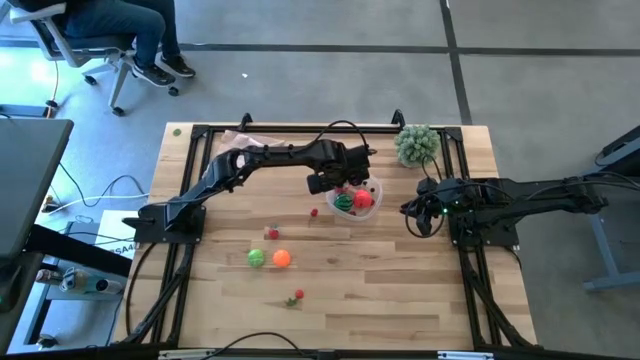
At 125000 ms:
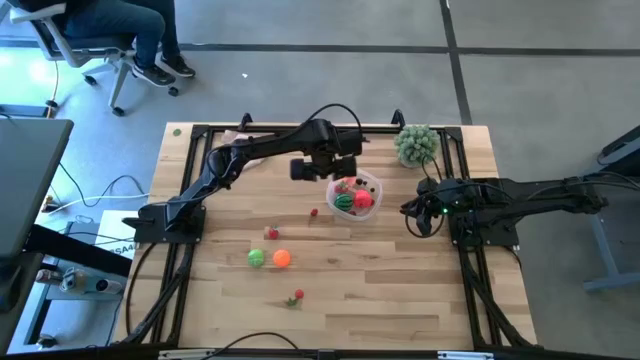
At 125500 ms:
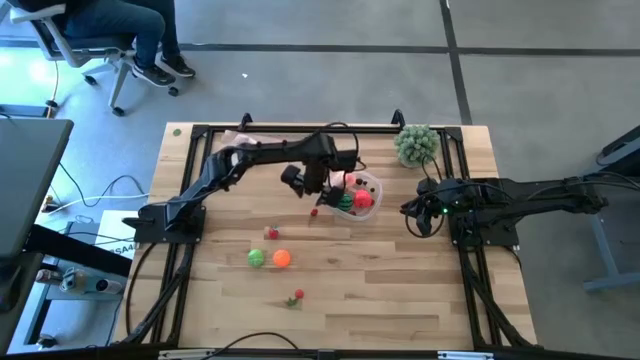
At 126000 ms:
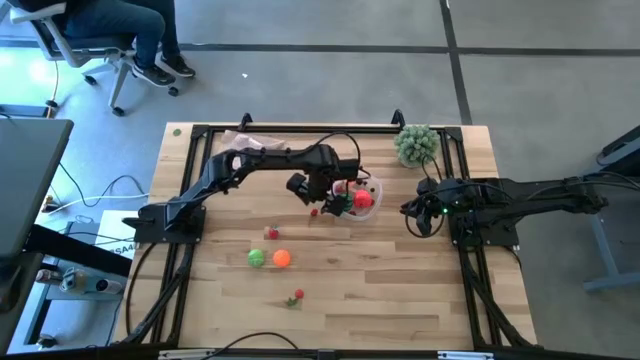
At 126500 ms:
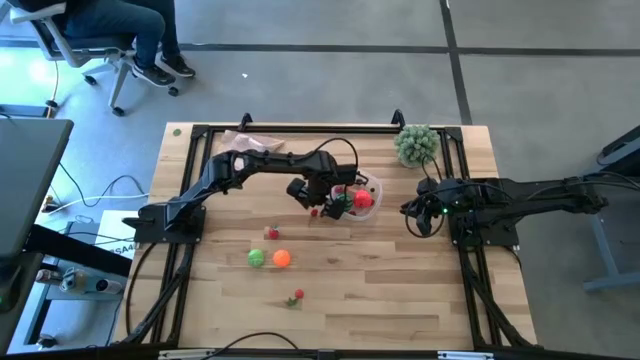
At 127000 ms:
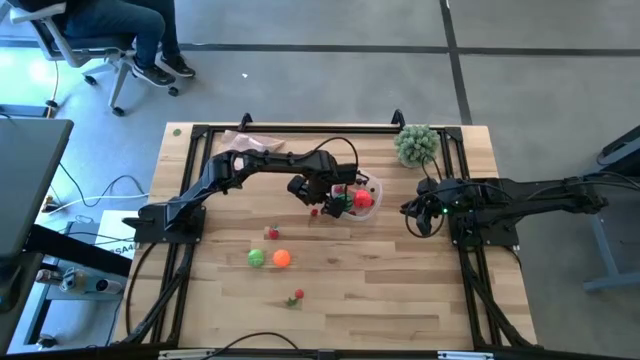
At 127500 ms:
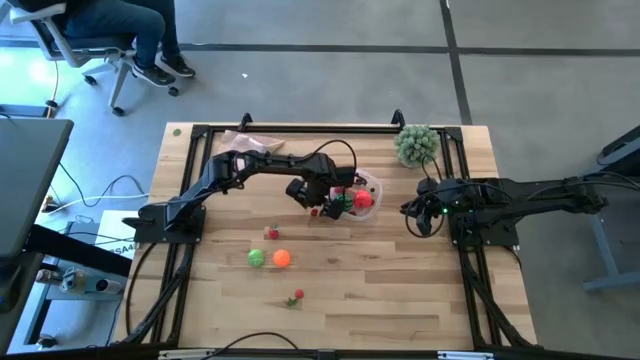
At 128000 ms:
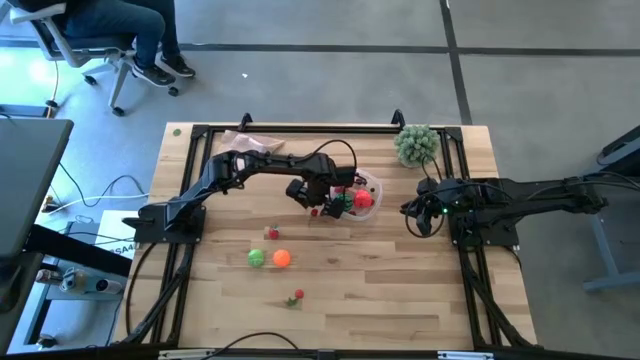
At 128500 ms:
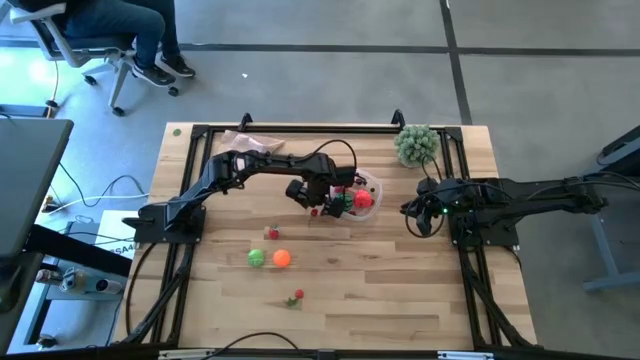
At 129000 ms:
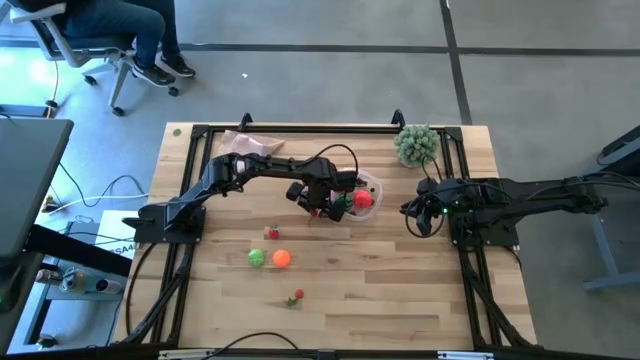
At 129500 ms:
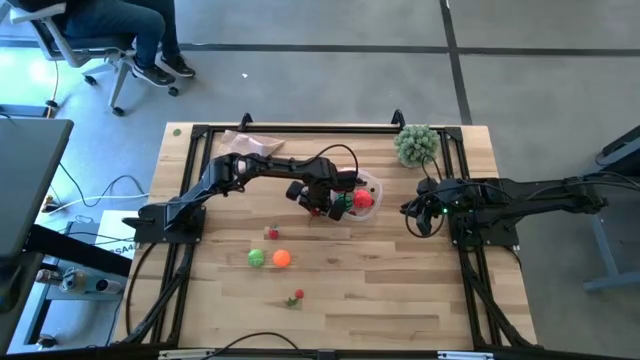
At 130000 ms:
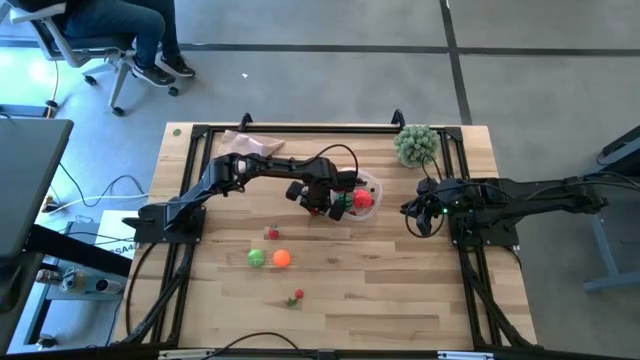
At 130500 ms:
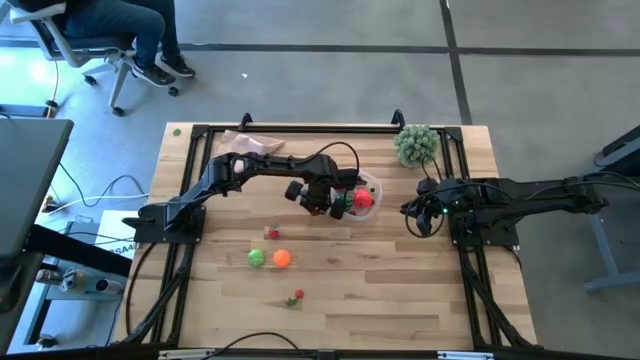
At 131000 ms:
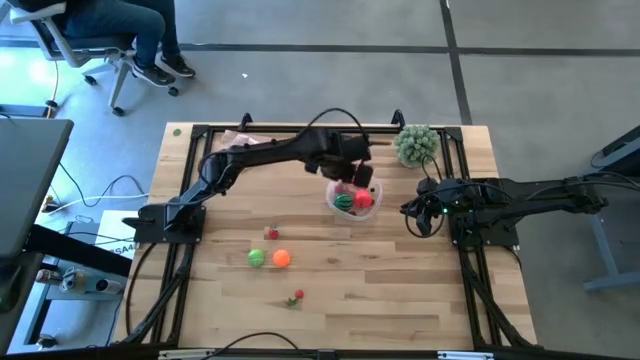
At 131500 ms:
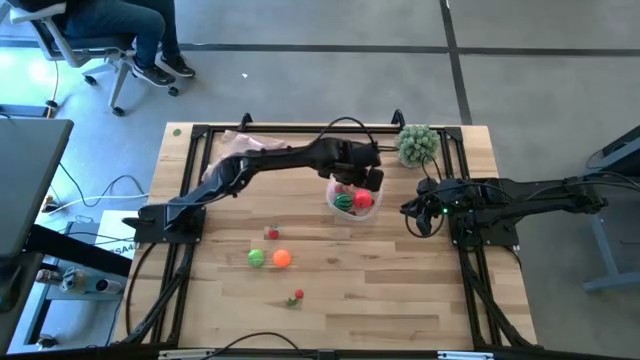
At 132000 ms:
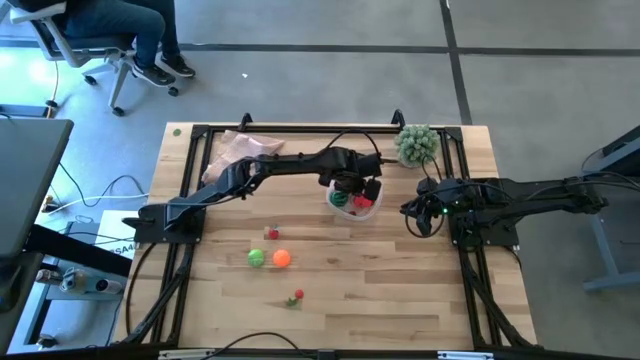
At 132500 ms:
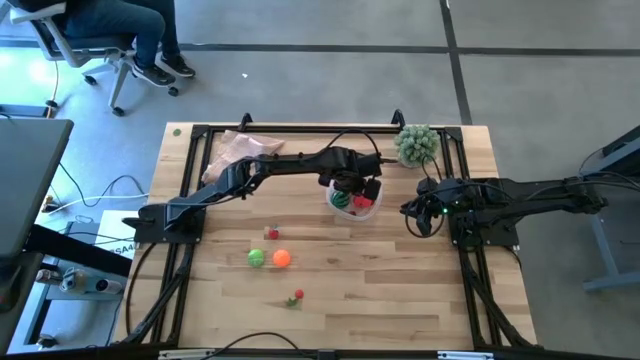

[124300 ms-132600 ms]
Task: Pick and placing Produce into tupperware
Put the cherry into the transparent bin

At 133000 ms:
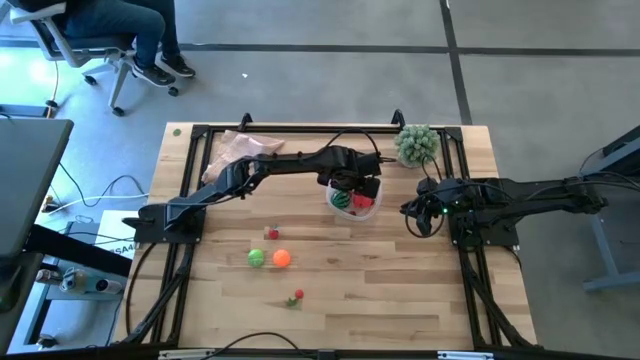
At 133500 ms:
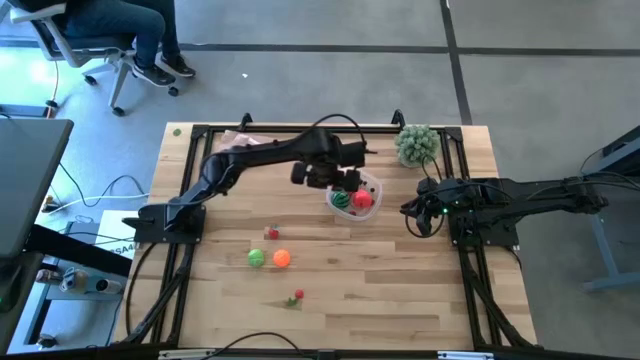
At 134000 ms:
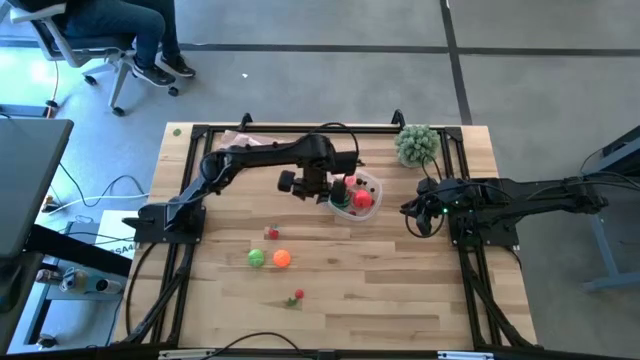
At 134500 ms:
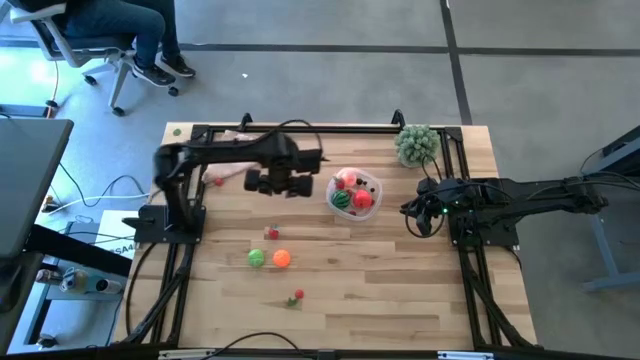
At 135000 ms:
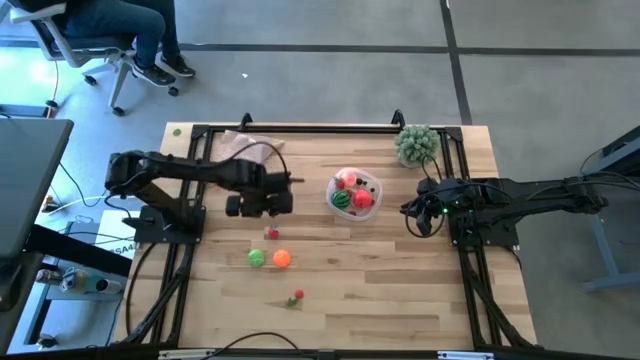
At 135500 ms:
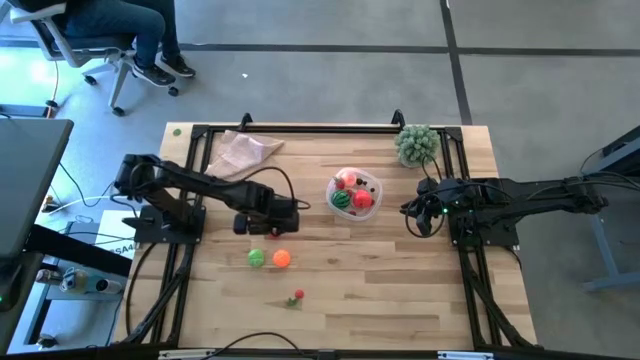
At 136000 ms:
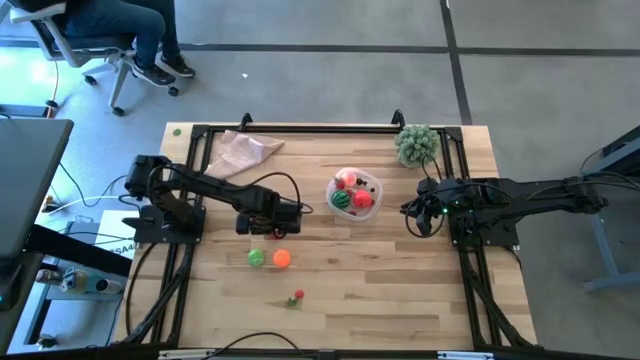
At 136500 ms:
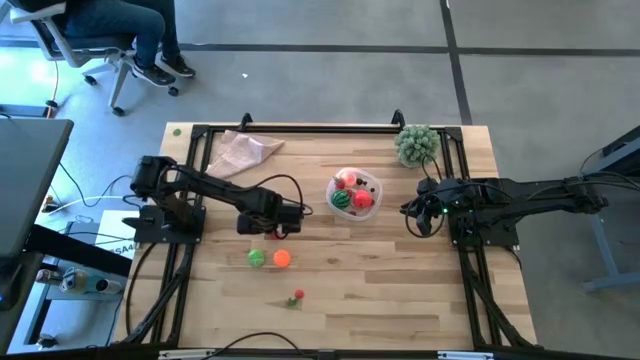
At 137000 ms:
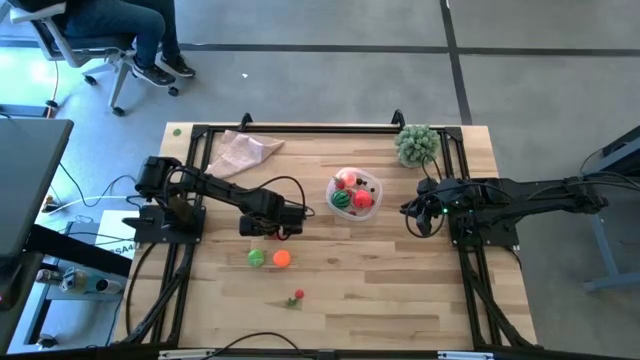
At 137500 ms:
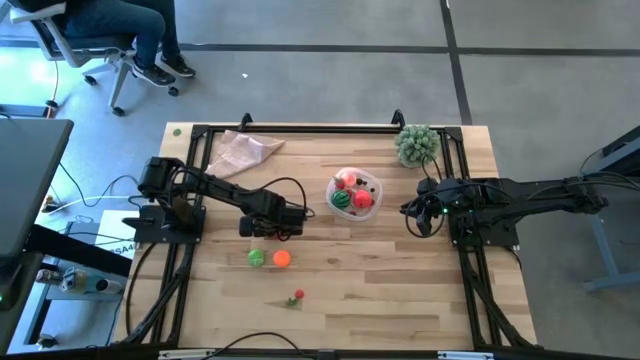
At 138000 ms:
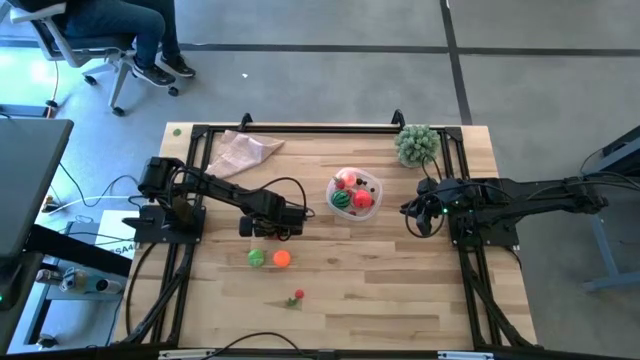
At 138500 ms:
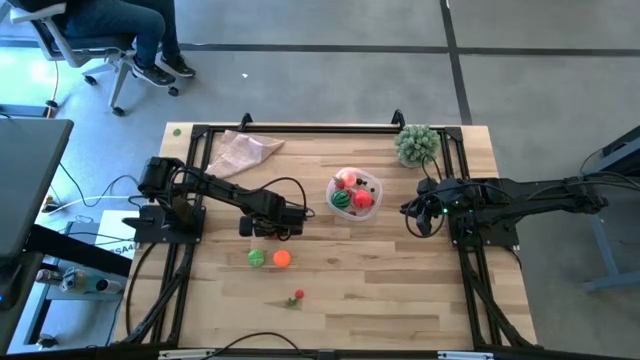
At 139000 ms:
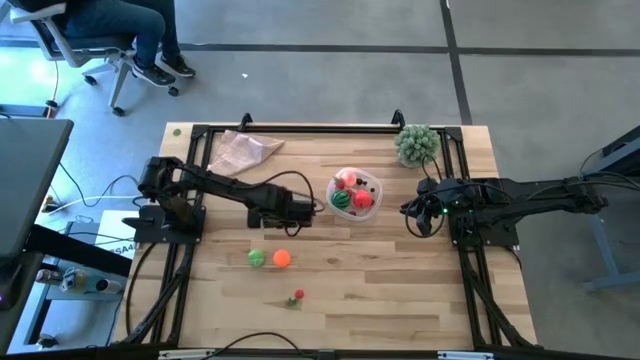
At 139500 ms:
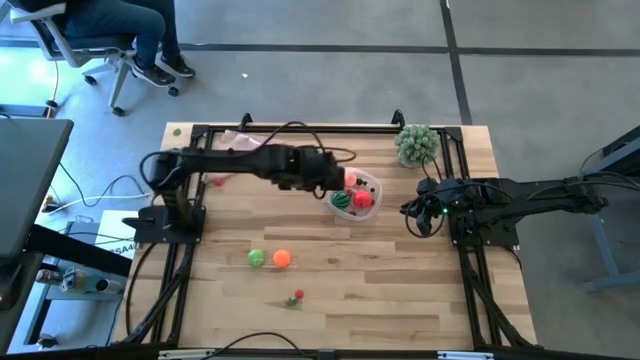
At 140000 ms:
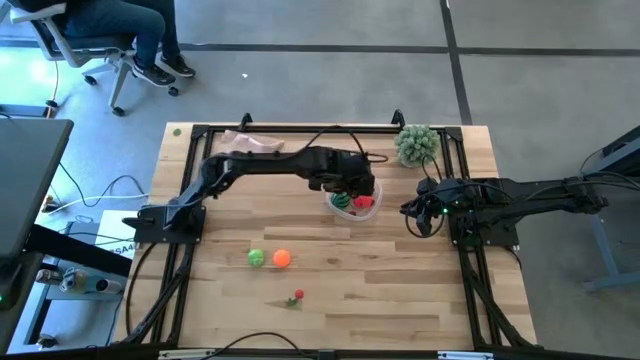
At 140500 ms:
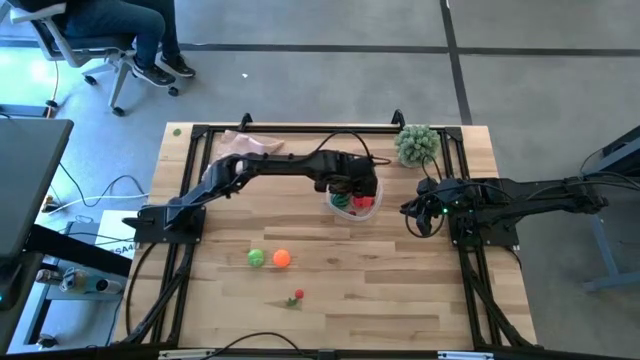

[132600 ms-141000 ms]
Put the strawberry into the transparent bin

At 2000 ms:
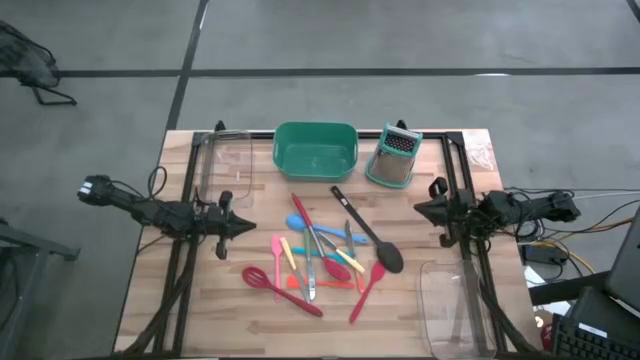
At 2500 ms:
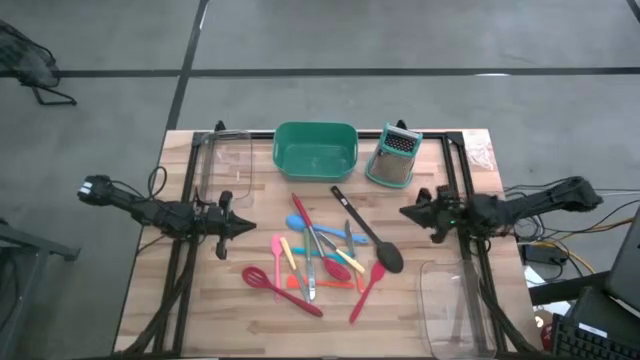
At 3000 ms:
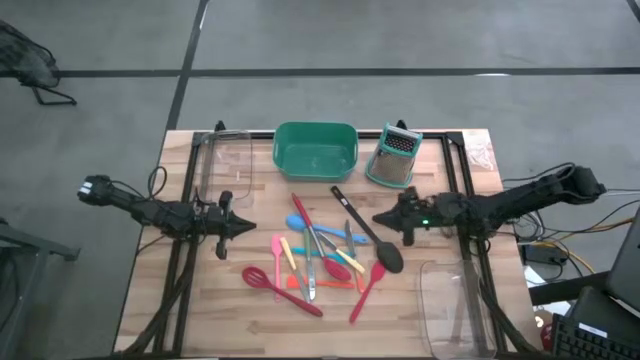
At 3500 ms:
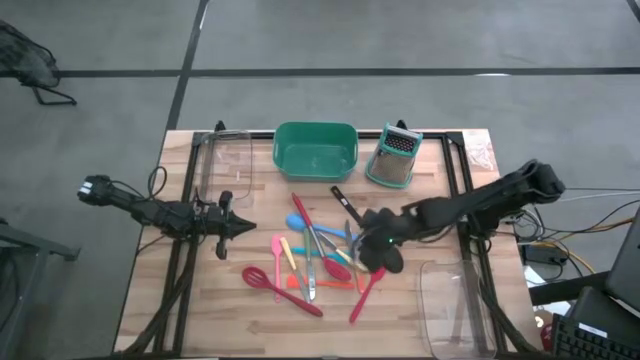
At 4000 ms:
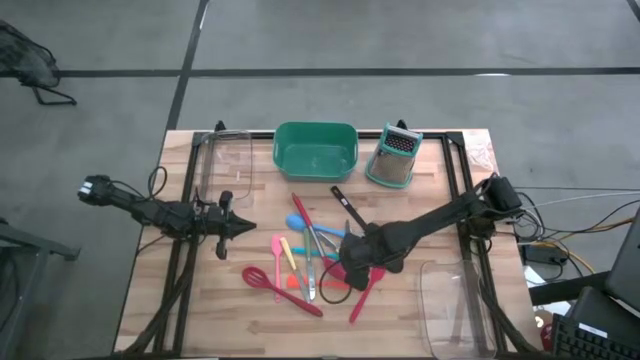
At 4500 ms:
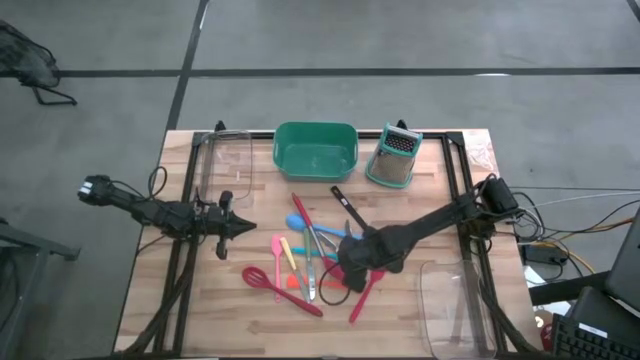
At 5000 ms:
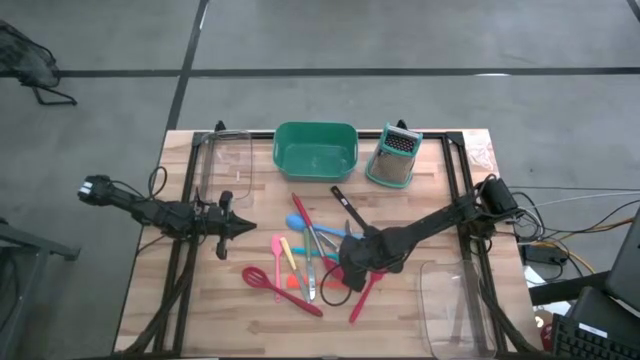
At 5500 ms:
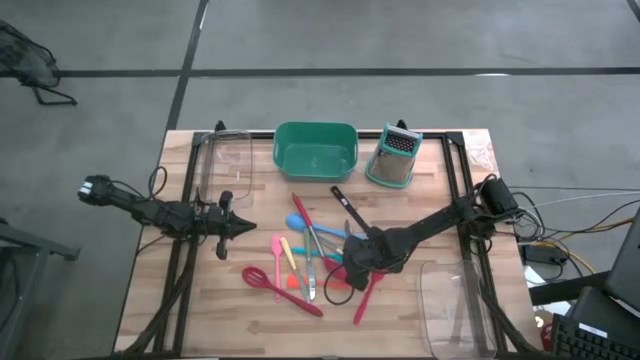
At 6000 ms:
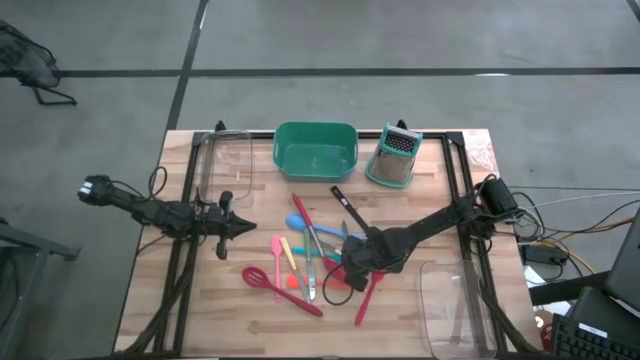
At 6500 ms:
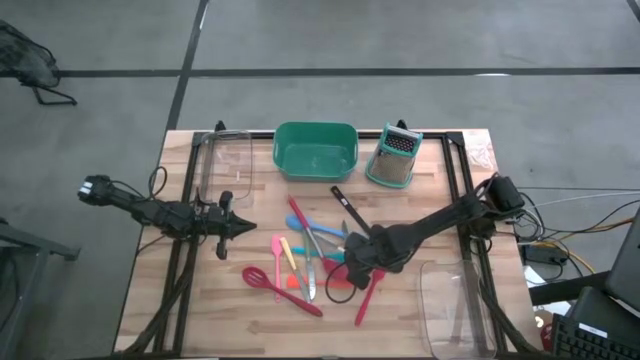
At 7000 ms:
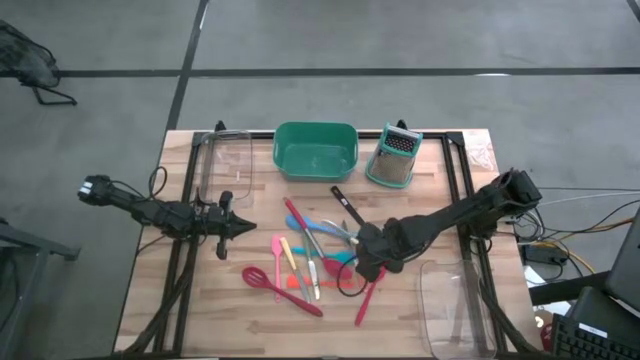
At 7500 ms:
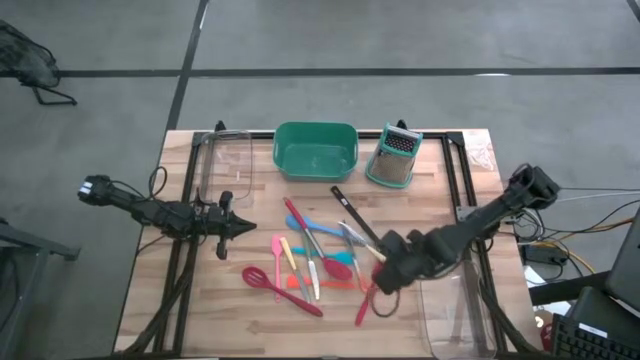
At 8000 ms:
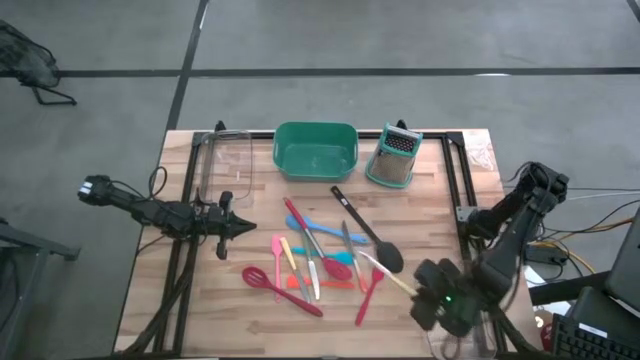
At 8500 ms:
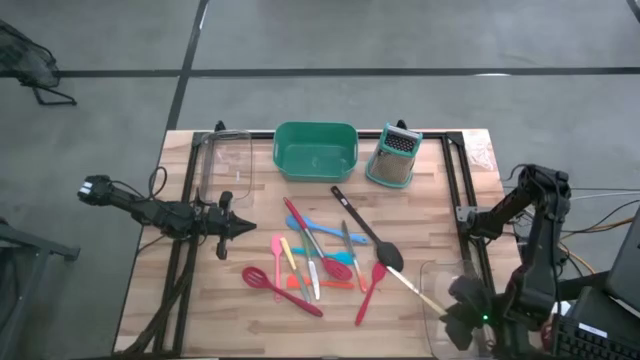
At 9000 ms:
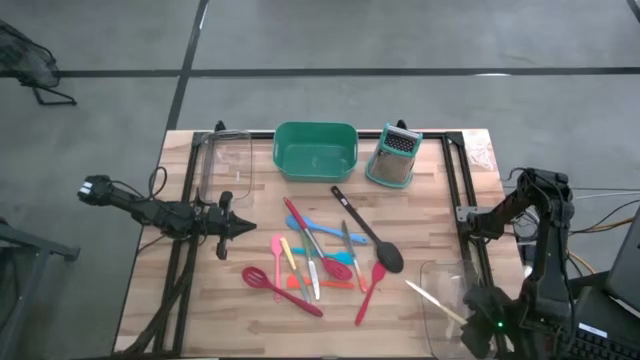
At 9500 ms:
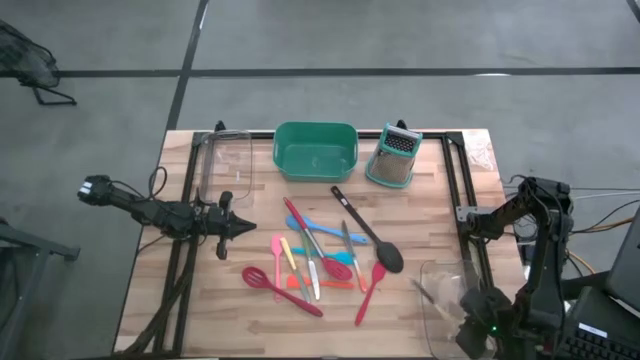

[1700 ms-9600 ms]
Task: Pick & Place Kitchen Items
Put the yellow knife into the bottom right transparent bin
